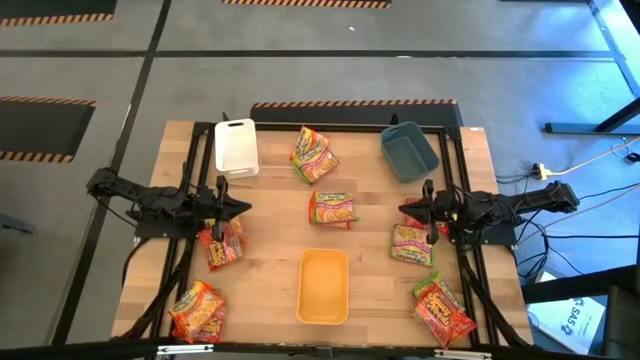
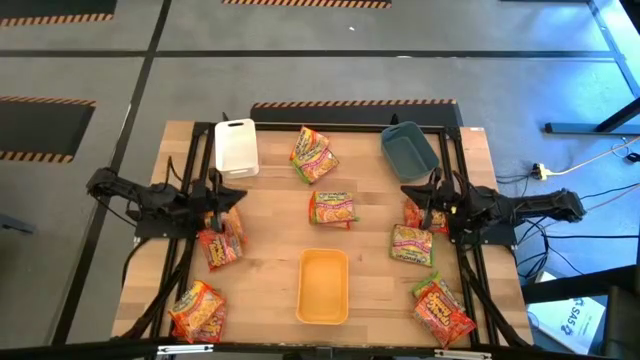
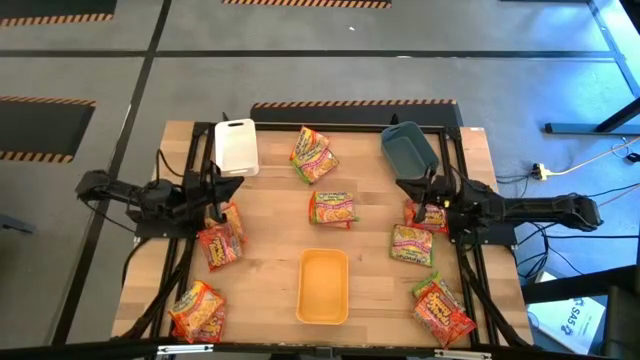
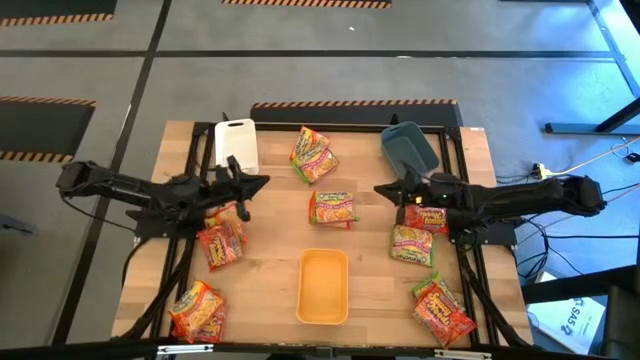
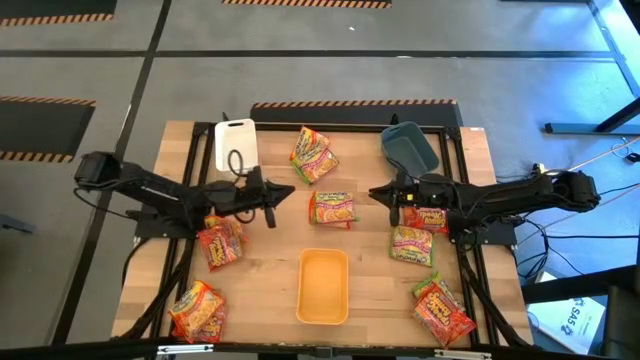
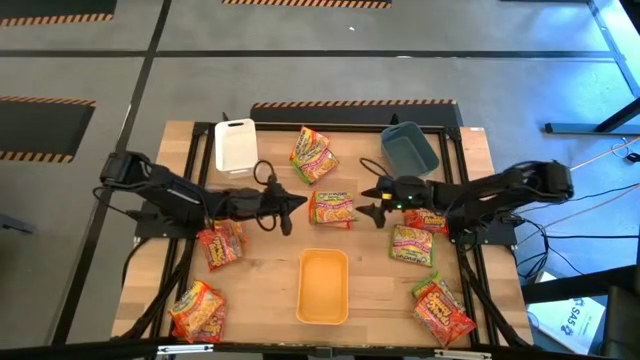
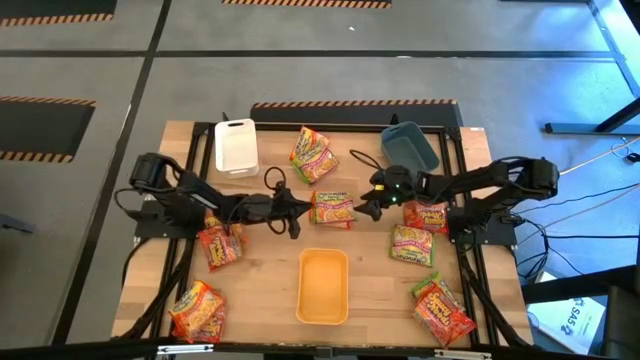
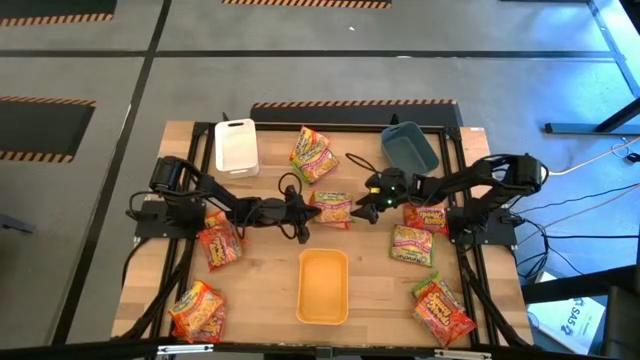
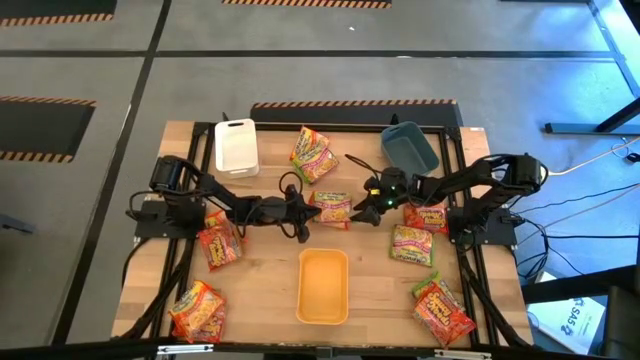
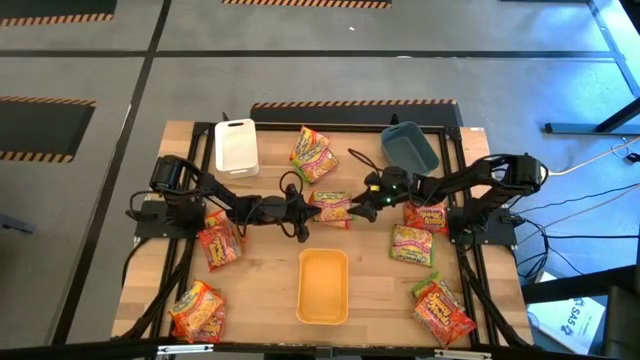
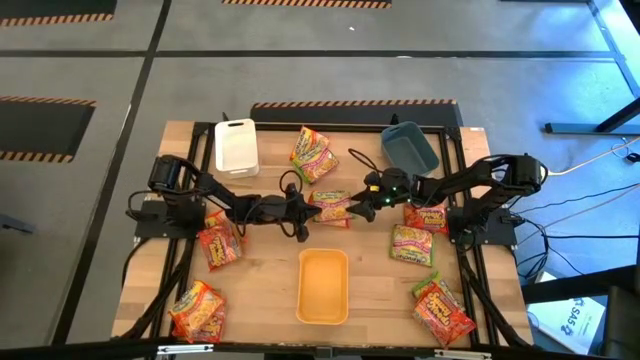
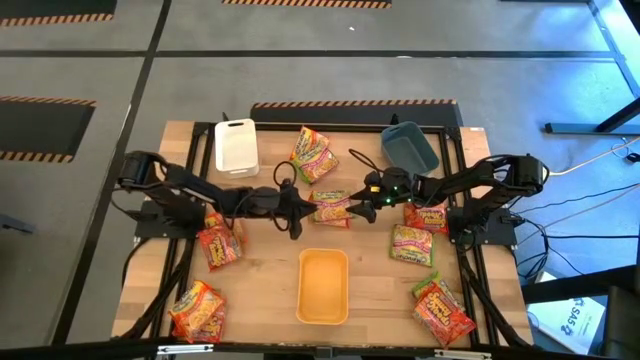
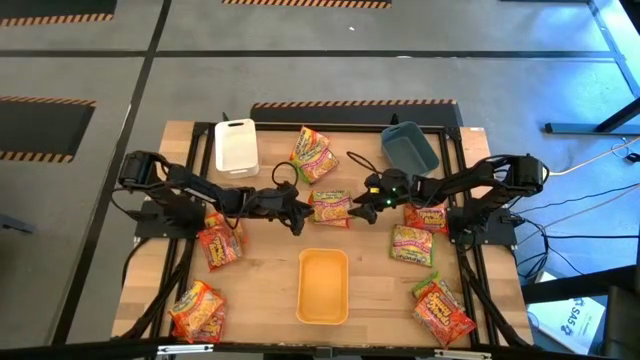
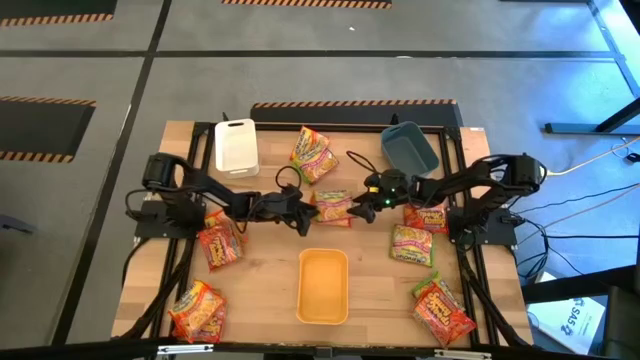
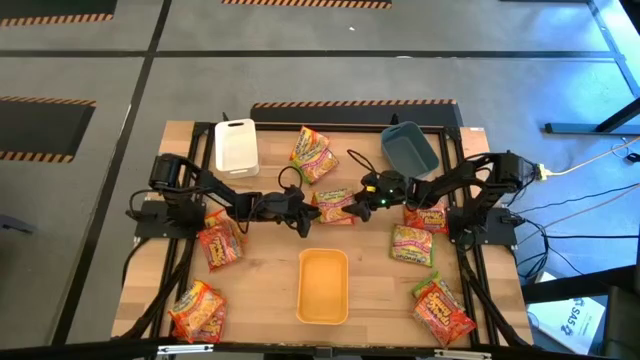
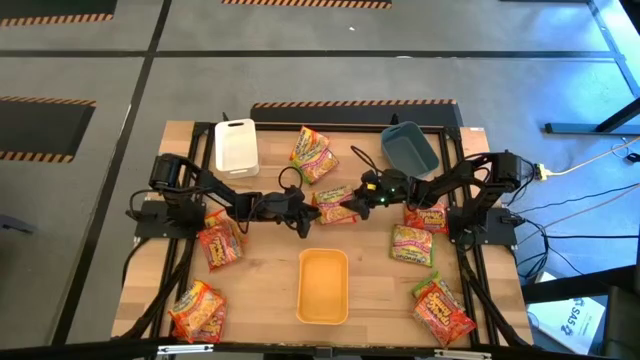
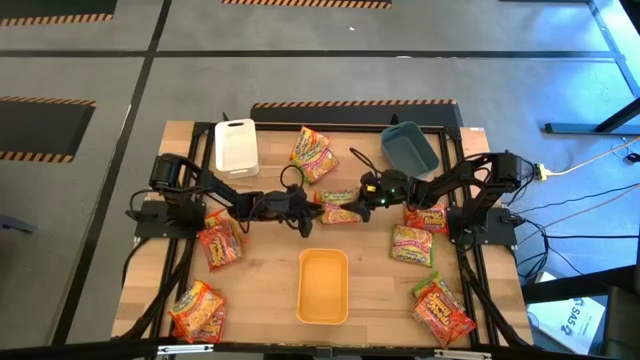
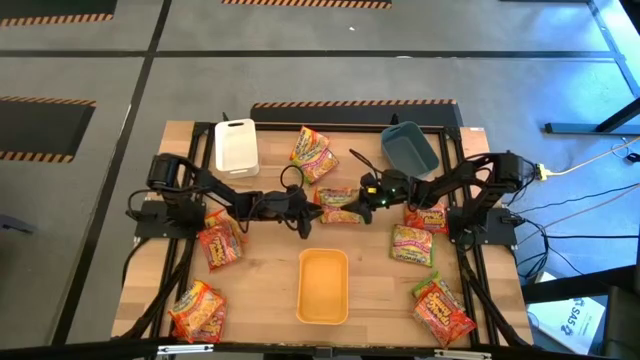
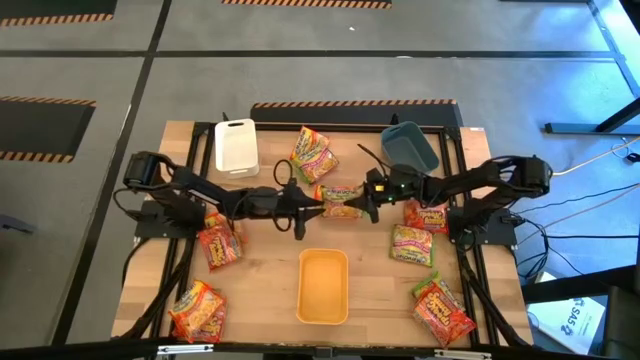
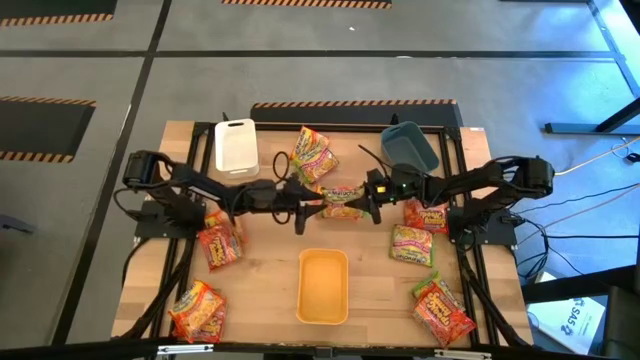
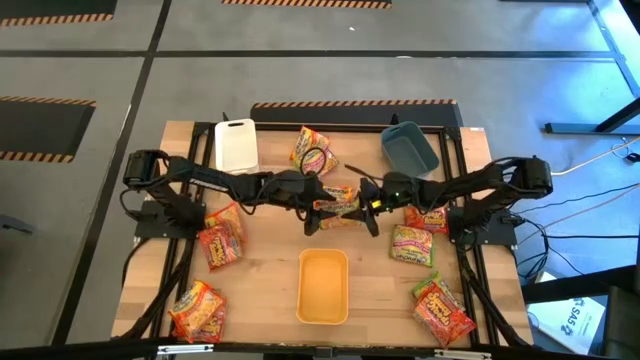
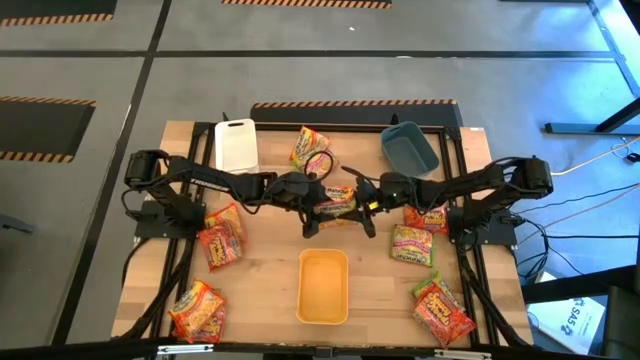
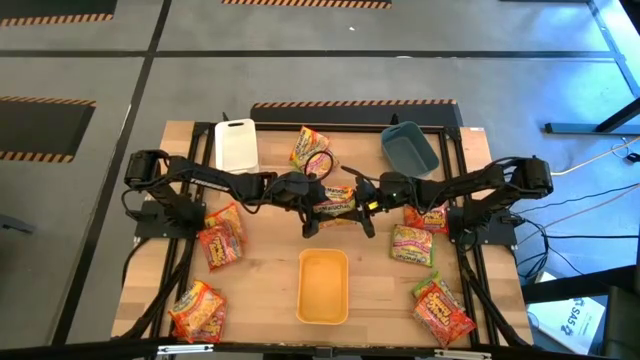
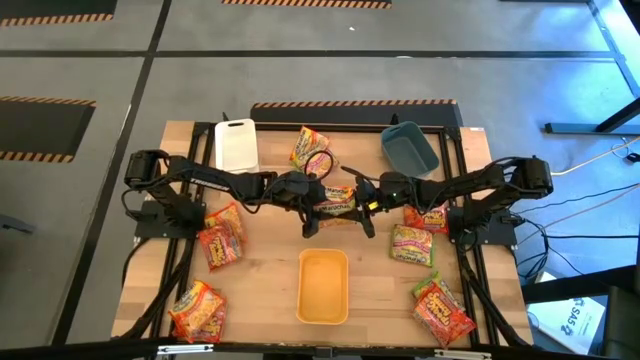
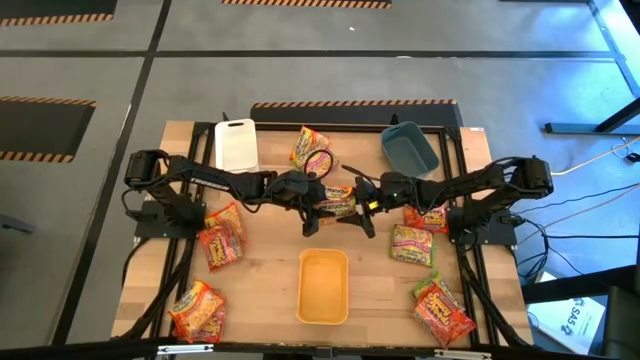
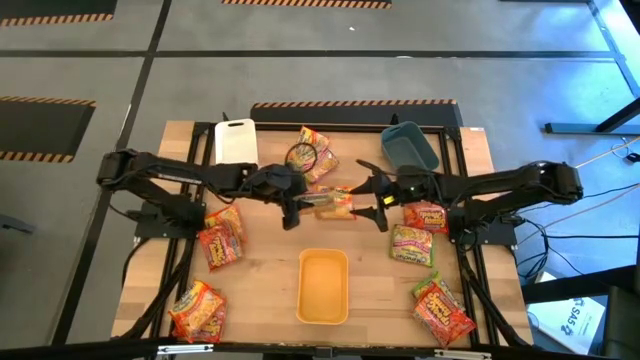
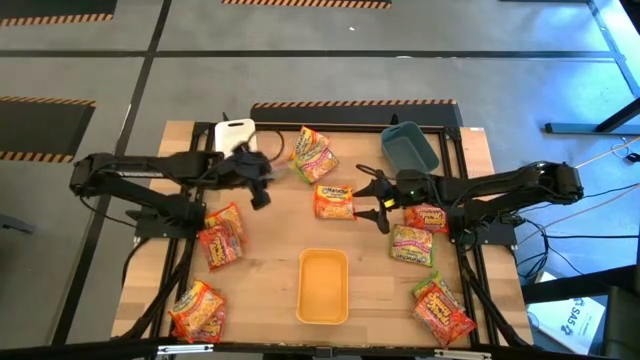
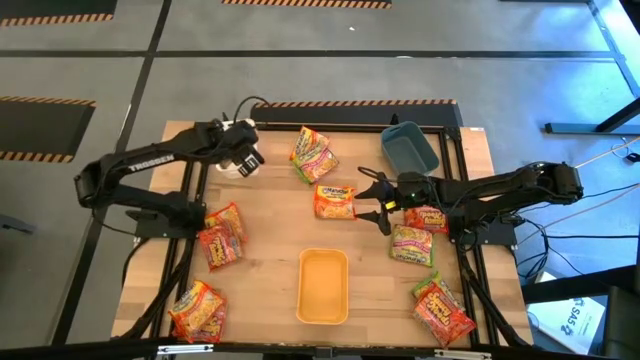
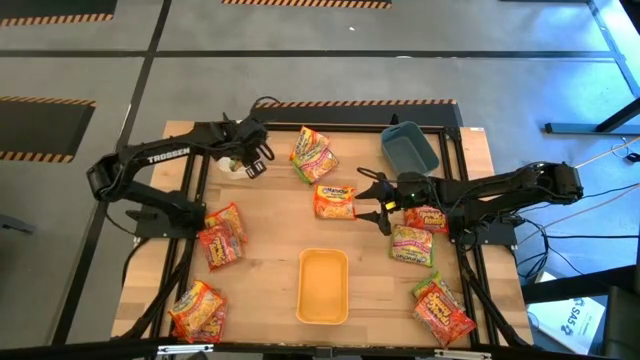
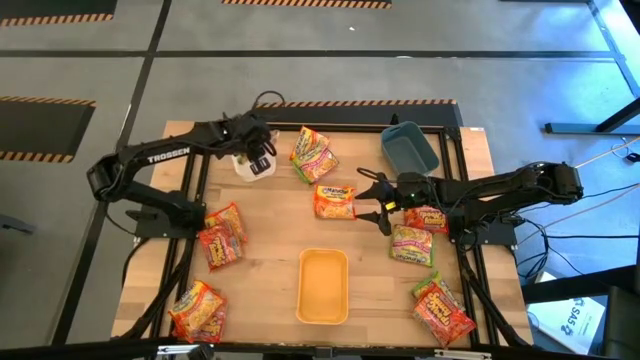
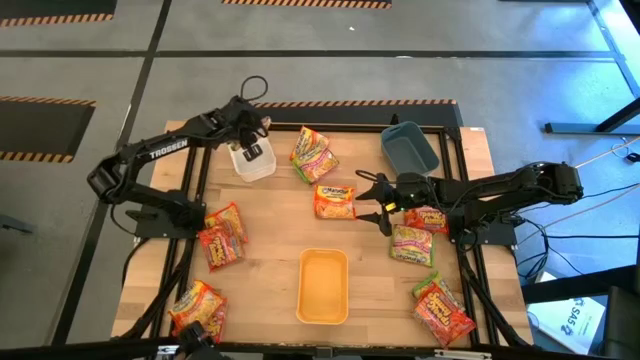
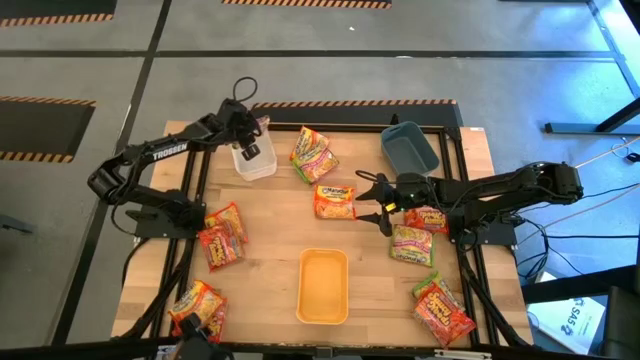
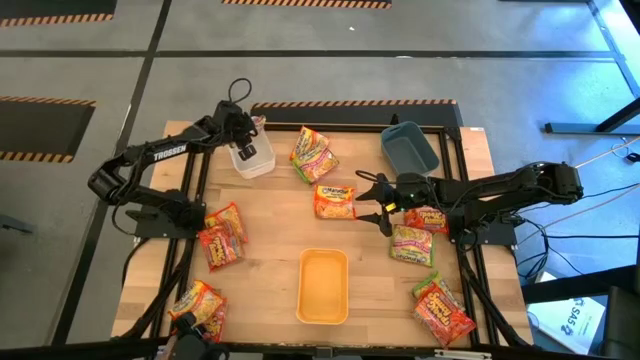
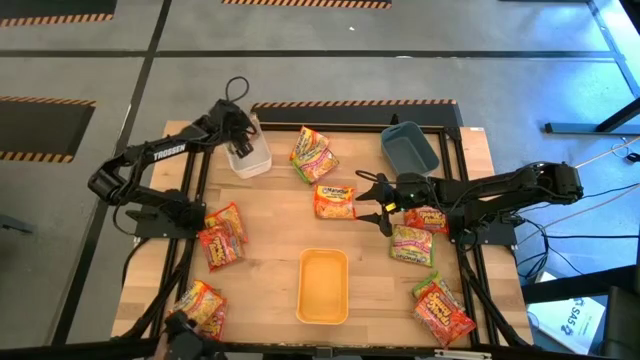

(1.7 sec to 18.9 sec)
Task: Sort Maruchan noodles
Put the middle left green noodle pack into the white bin
